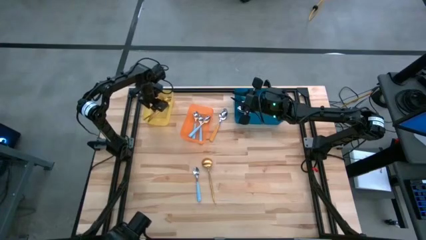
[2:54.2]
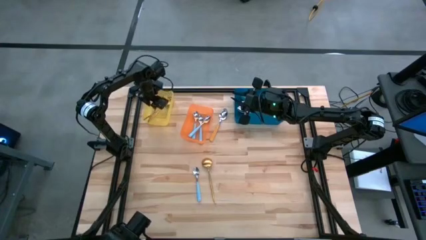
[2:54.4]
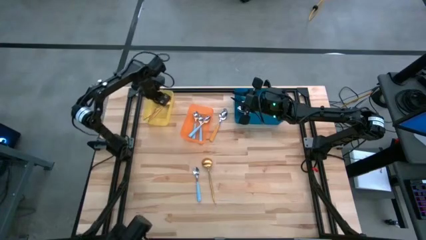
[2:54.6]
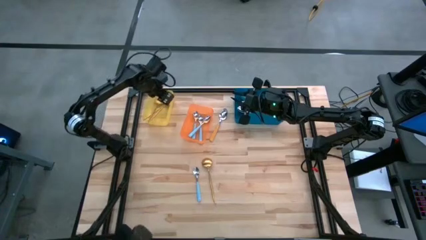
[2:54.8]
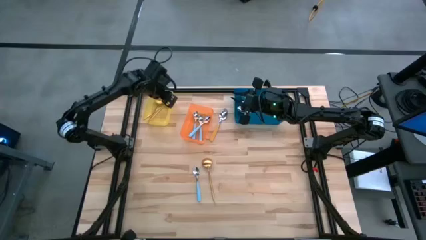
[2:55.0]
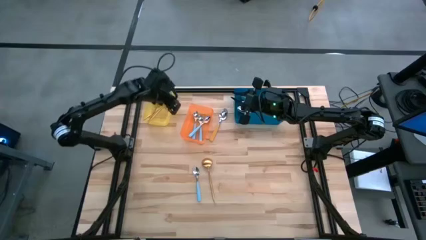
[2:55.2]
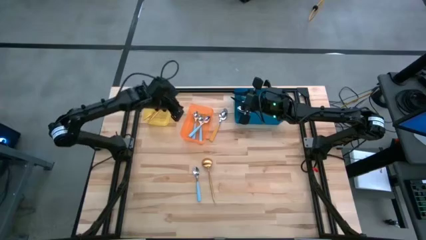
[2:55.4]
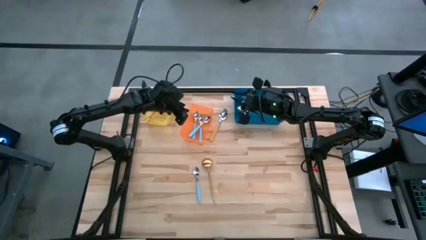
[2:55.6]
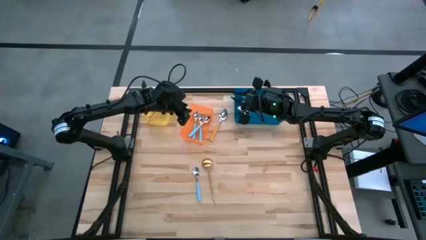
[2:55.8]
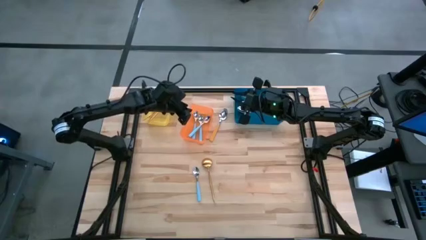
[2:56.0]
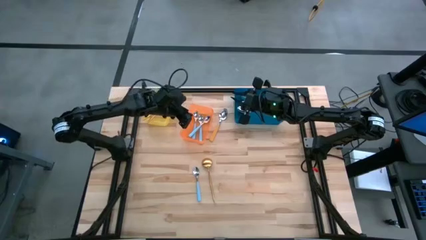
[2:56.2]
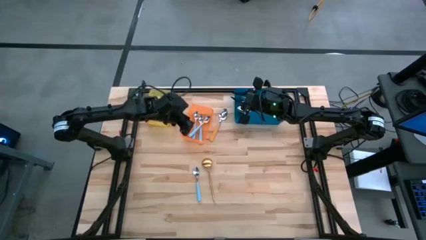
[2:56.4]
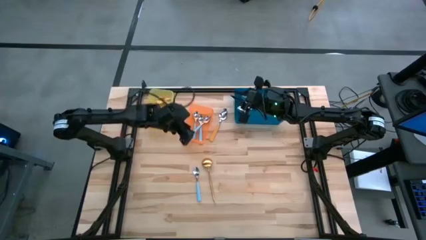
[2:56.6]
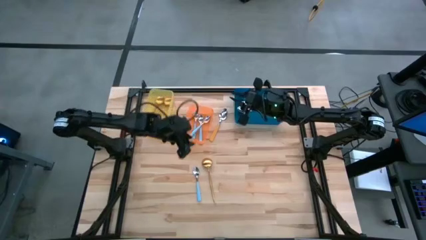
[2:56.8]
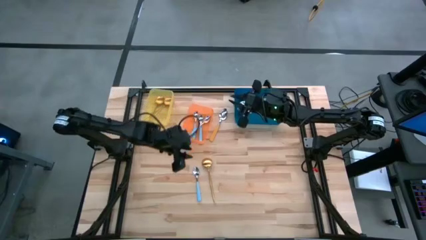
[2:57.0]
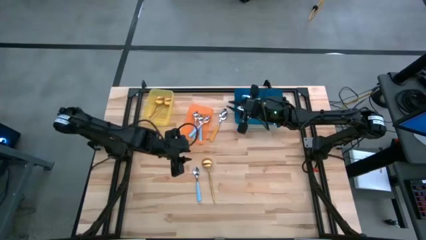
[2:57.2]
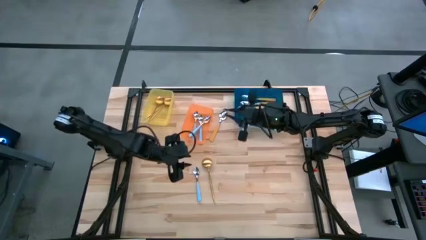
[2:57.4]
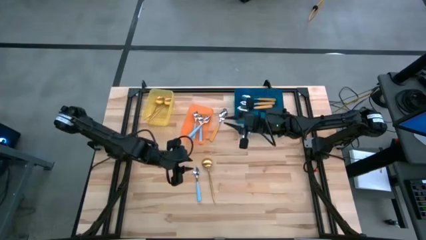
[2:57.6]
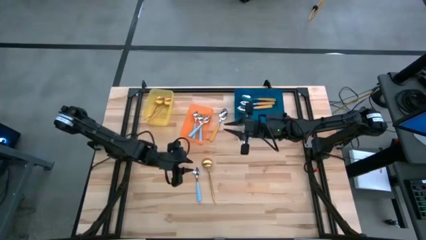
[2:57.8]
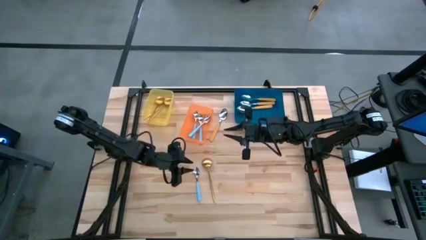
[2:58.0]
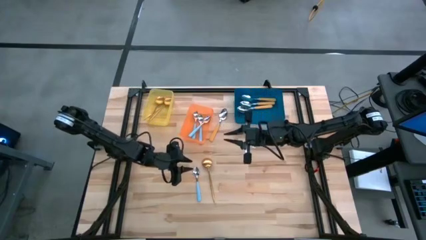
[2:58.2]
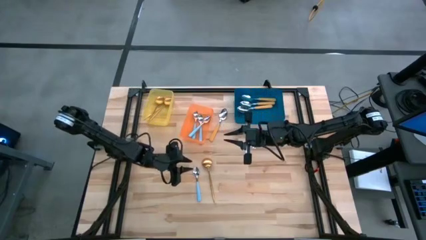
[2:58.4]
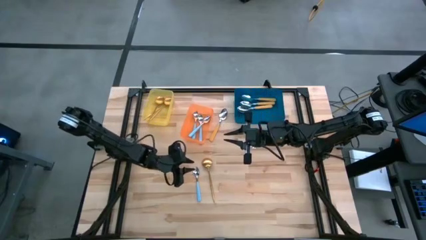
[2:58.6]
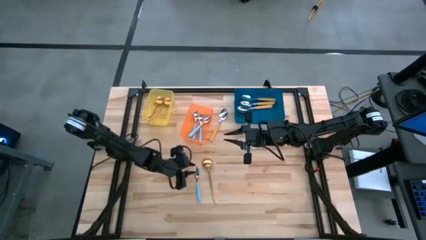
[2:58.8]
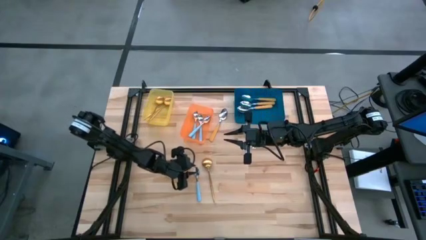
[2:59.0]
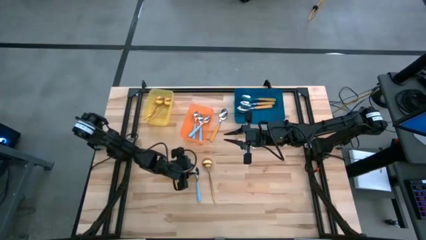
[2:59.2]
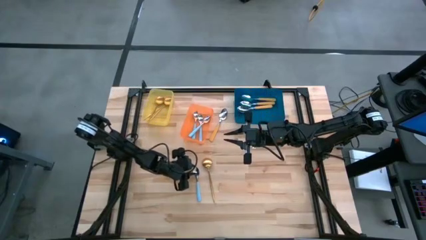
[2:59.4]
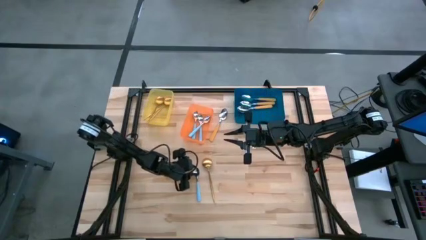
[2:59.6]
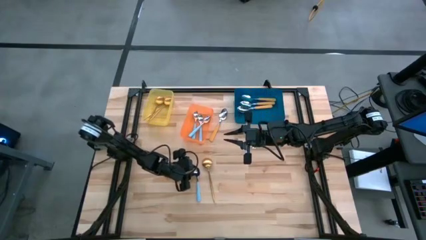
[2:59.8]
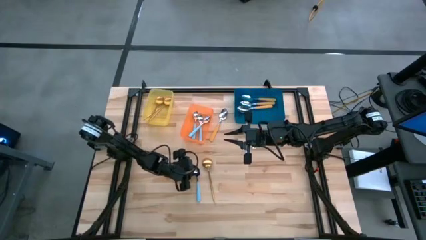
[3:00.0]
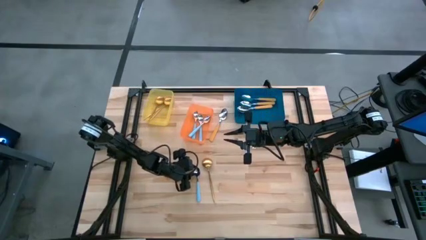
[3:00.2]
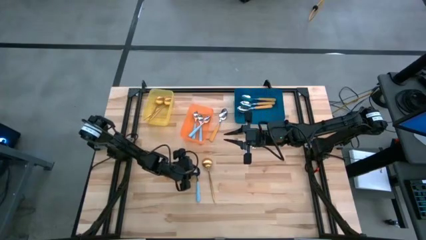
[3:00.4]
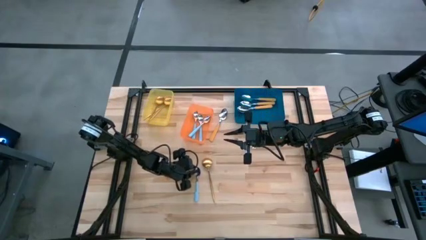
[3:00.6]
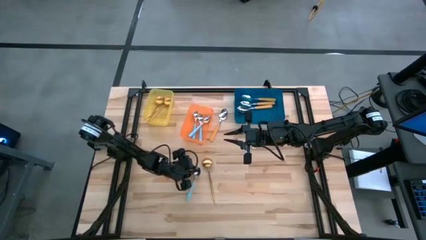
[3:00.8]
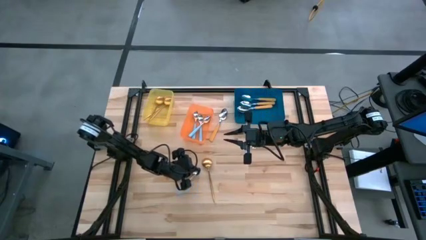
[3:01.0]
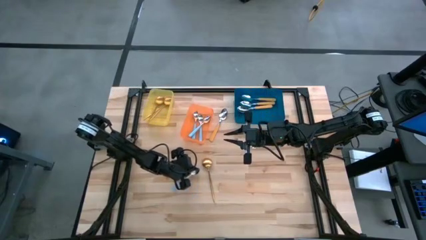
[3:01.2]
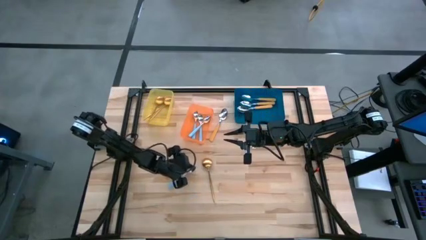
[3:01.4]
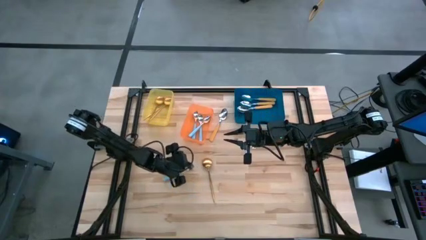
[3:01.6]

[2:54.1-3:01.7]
Task: Sort silverware by color (type)
Put the blue spoon into the orange bin

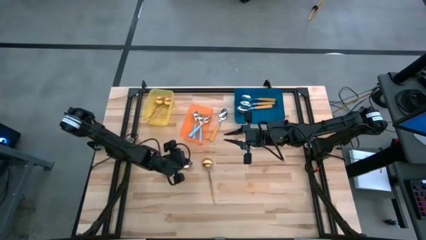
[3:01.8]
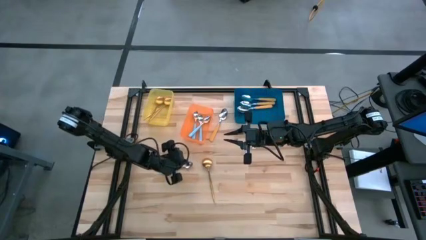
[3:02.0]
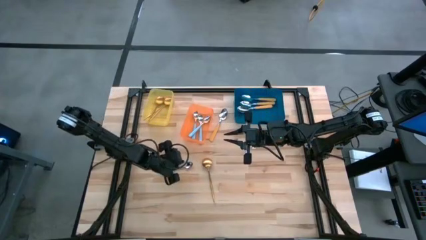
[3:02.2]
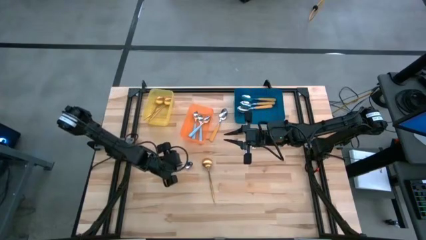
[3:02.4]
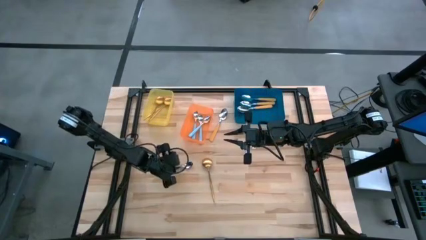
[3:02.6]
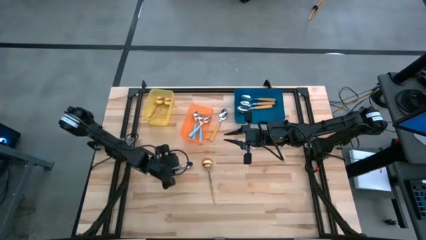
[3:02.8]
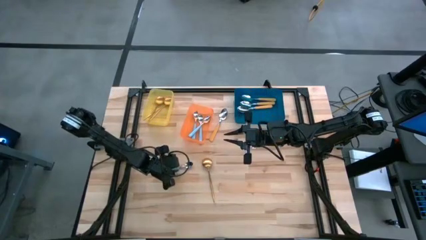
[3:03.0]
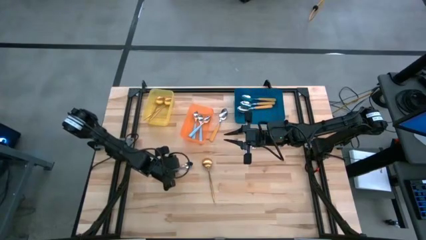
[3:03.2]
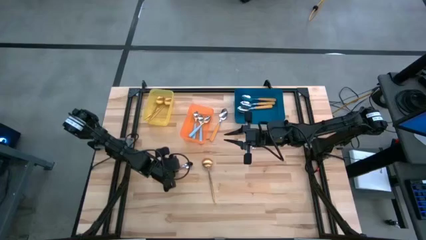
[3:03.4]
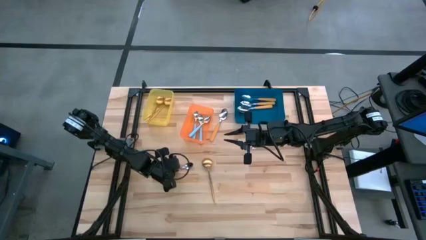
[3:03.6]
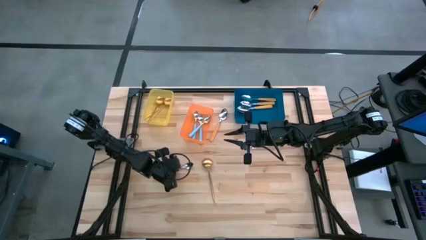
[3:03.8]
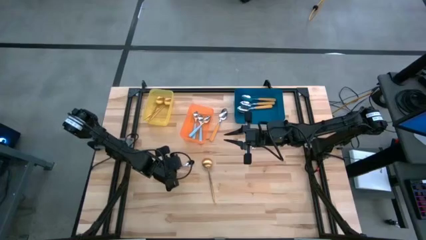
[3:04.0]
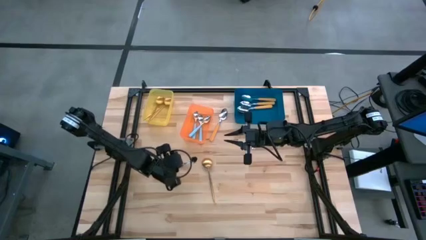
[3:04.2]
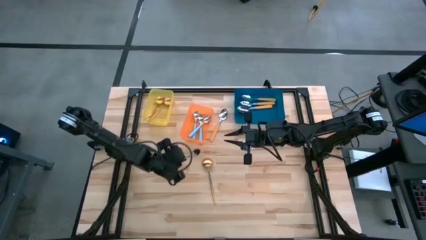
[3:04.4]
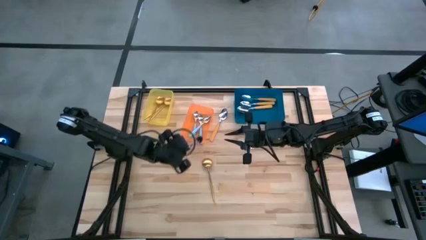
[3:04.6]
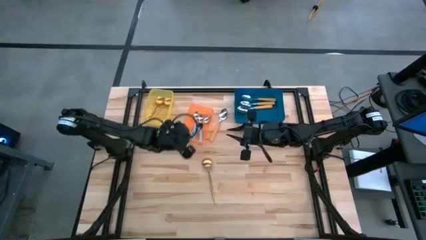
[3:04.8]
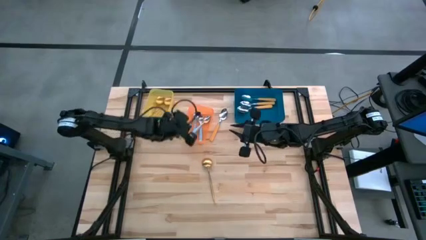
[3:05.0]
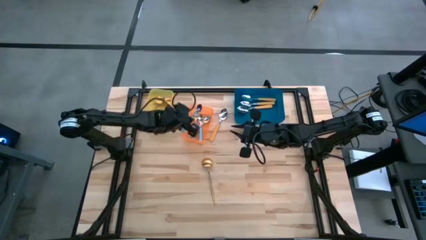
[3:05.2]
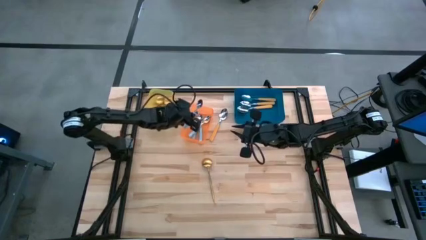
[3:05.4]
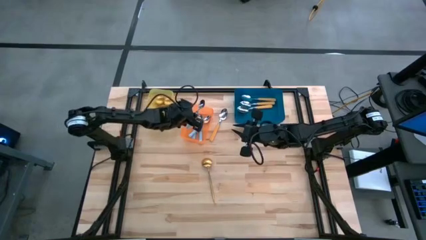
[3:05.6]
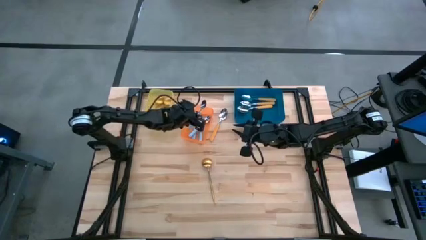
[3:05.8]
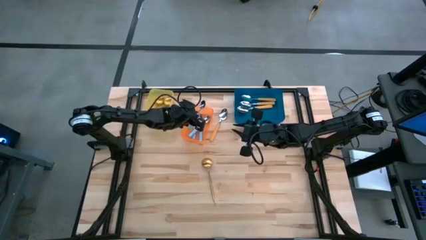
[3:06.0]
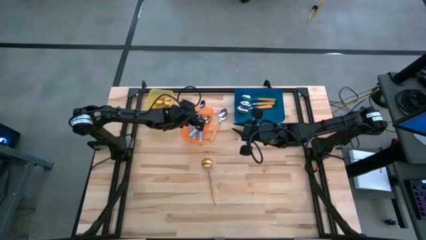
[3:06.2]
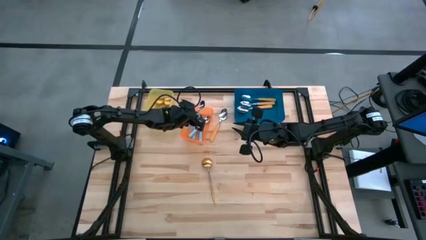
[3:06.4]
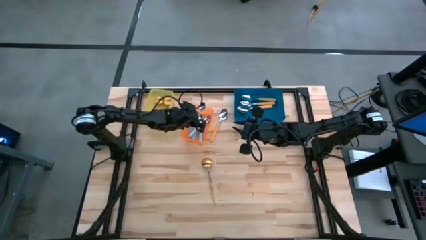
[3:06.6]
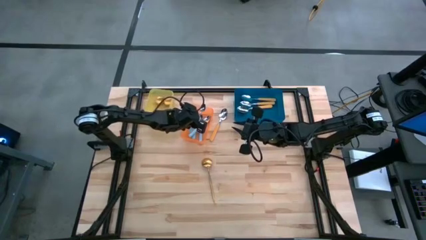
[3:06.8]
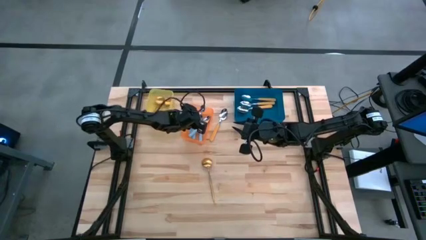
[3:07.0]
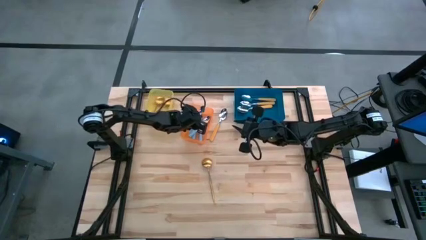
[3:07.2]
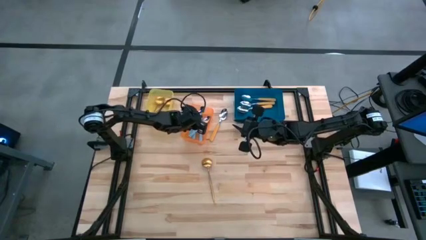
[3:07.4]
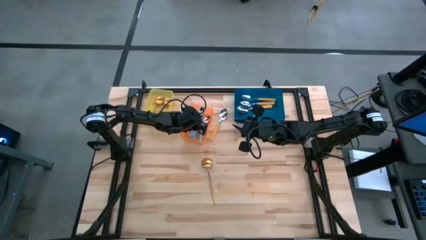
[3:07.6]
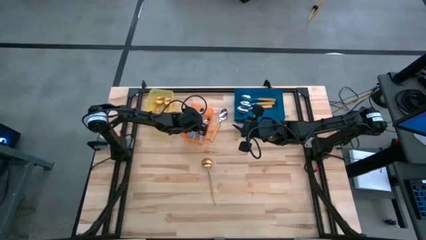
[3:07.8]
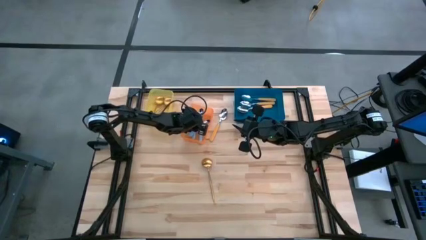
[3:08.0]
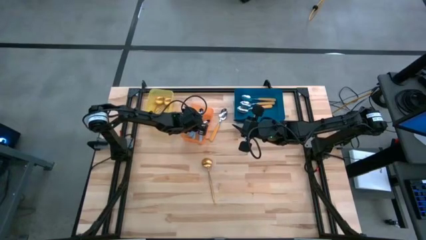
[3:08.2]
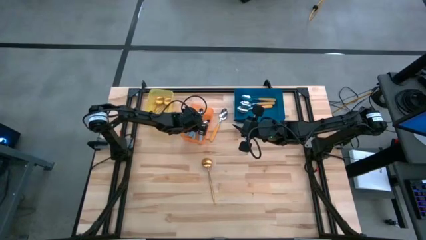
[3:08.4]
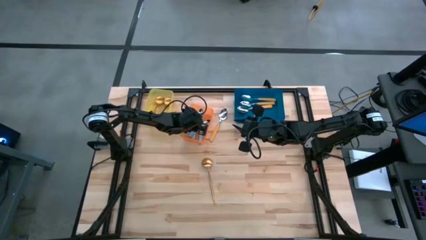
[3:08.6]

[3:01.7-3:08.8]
Put the blue spoon into the orange bin
